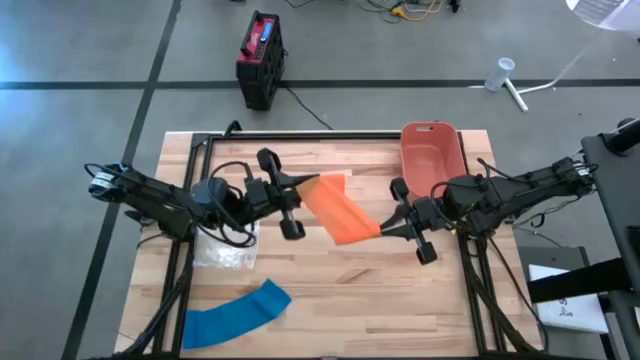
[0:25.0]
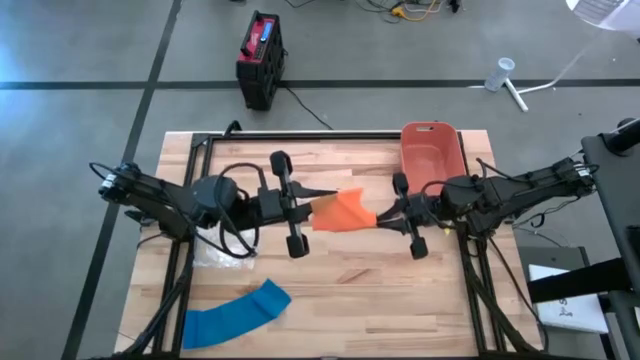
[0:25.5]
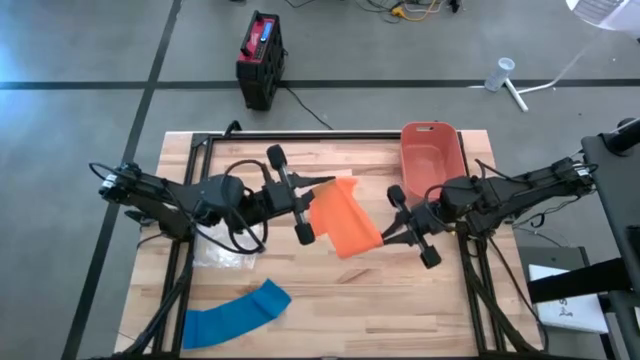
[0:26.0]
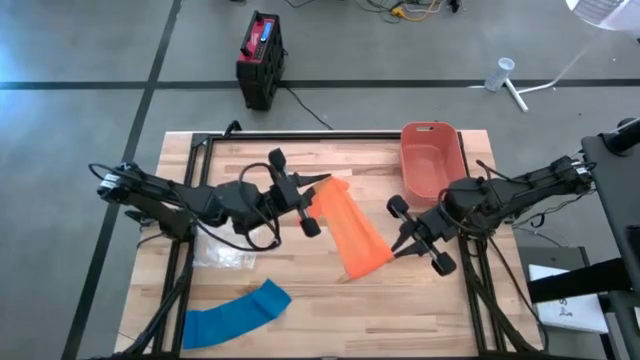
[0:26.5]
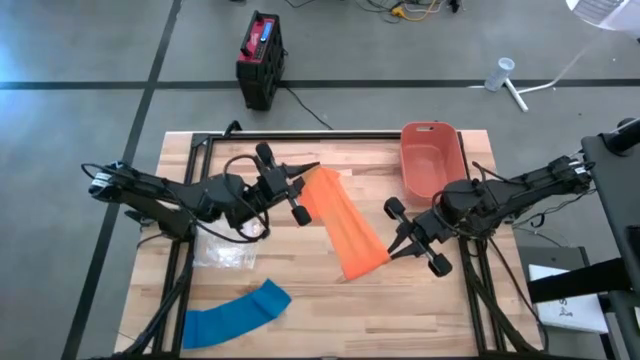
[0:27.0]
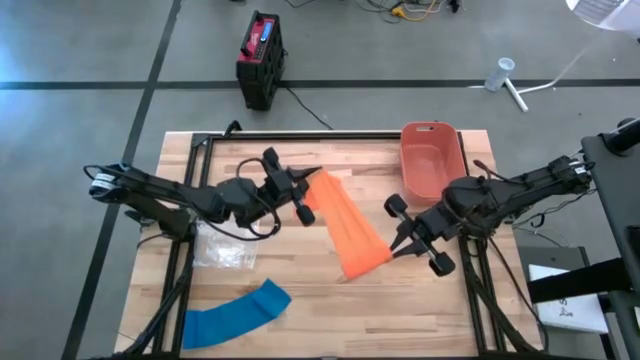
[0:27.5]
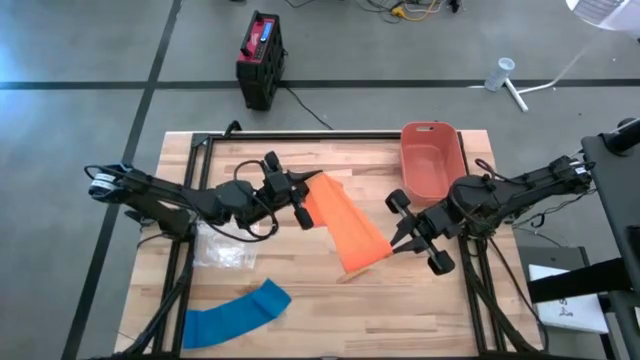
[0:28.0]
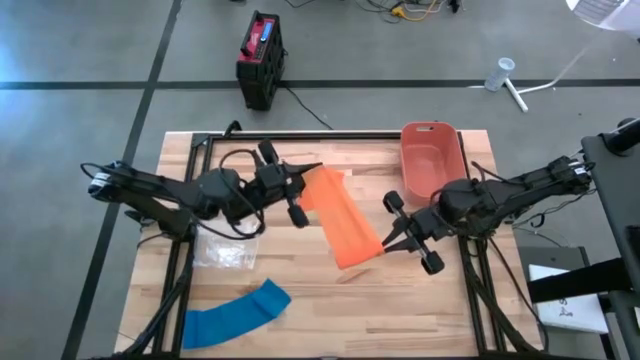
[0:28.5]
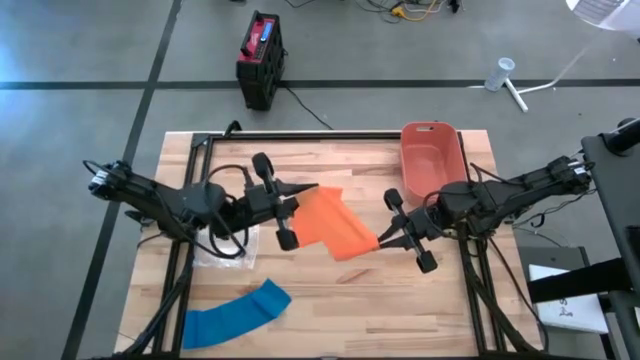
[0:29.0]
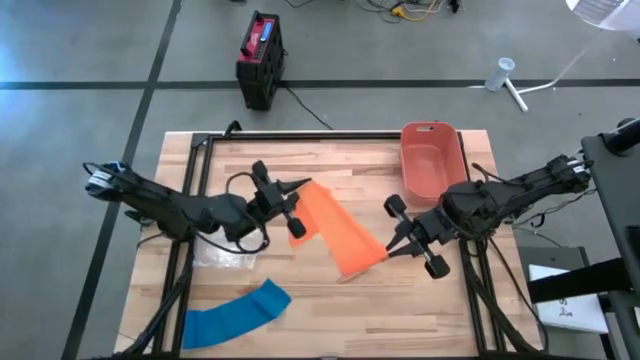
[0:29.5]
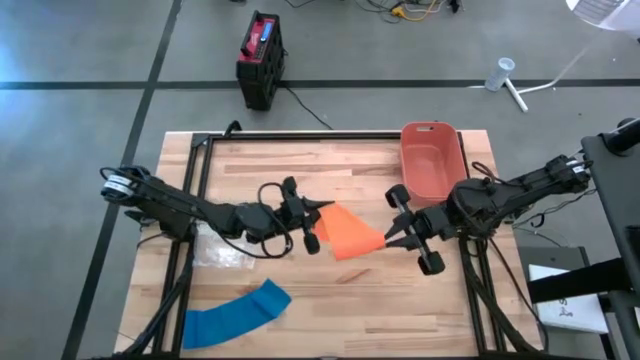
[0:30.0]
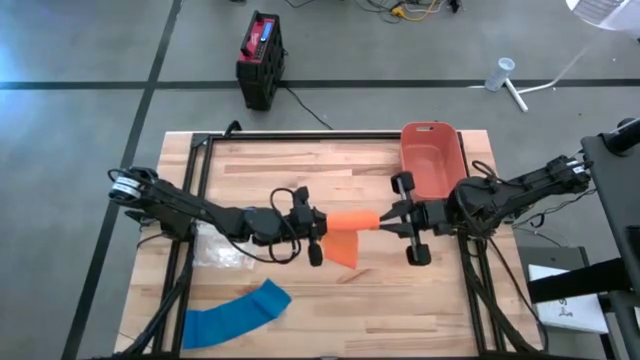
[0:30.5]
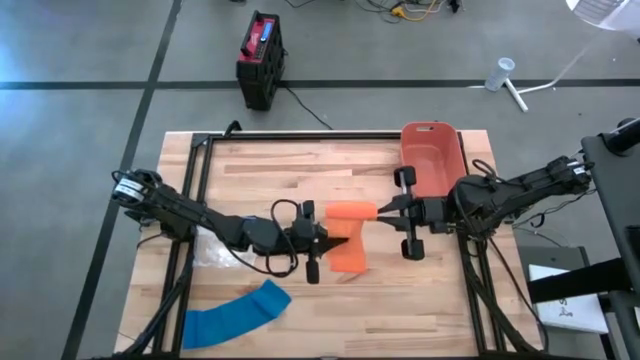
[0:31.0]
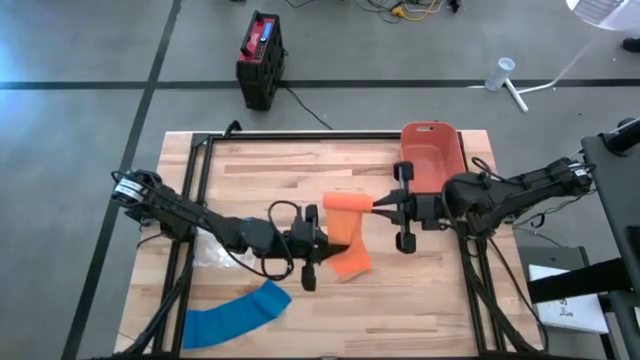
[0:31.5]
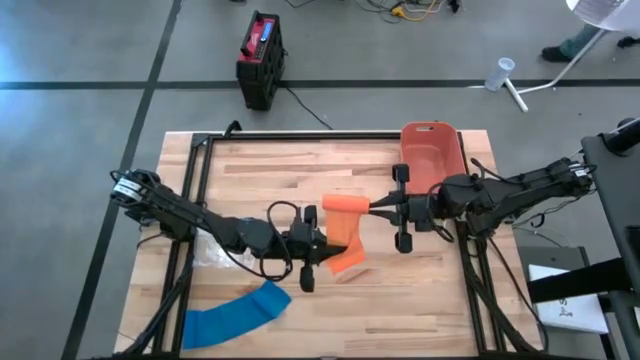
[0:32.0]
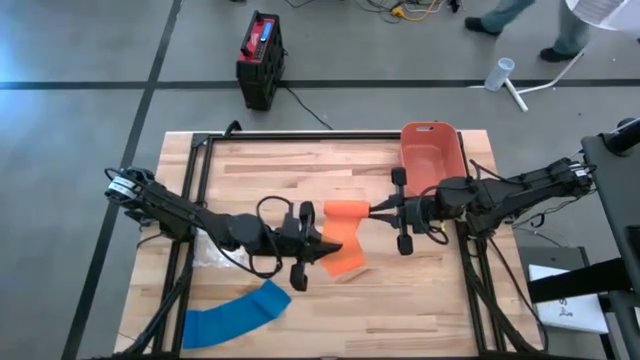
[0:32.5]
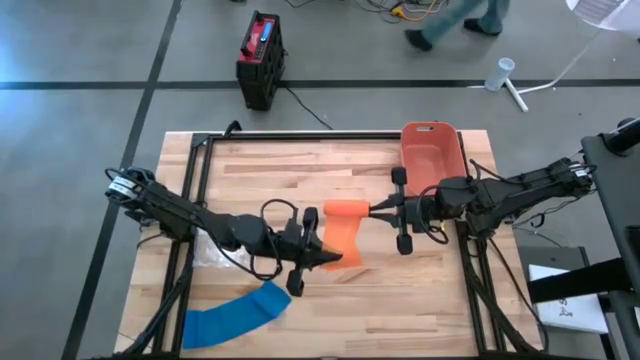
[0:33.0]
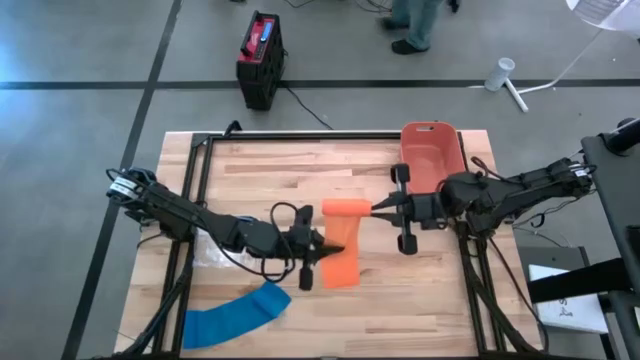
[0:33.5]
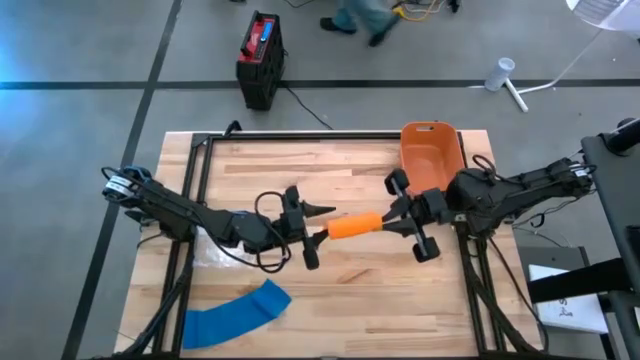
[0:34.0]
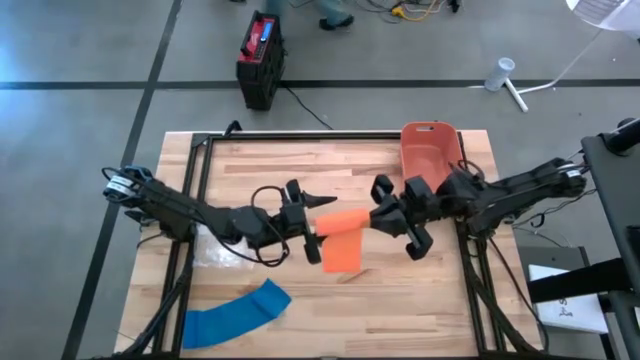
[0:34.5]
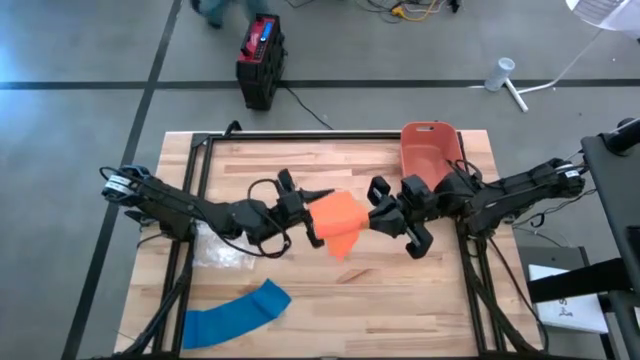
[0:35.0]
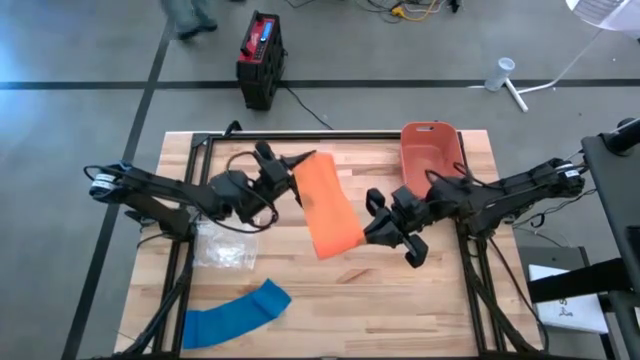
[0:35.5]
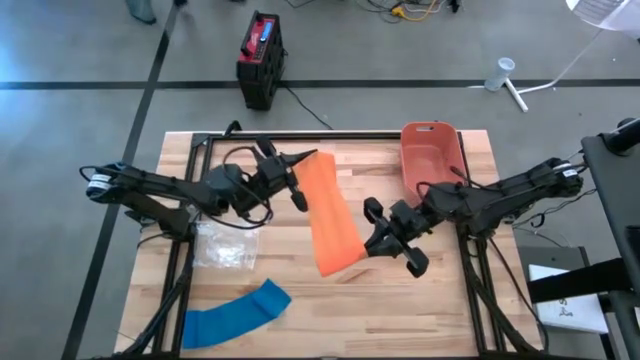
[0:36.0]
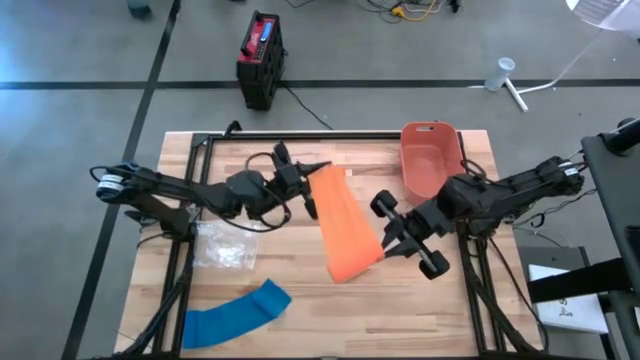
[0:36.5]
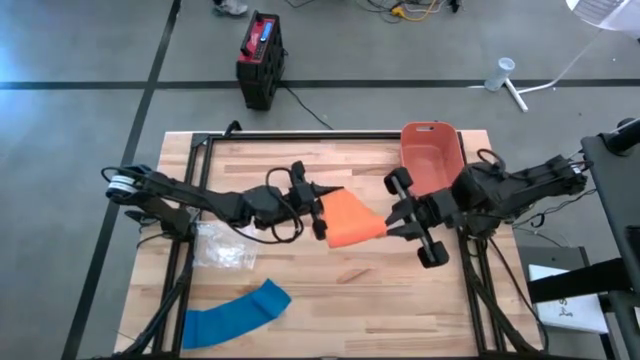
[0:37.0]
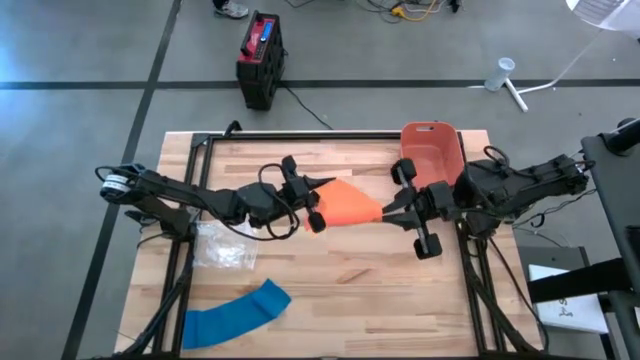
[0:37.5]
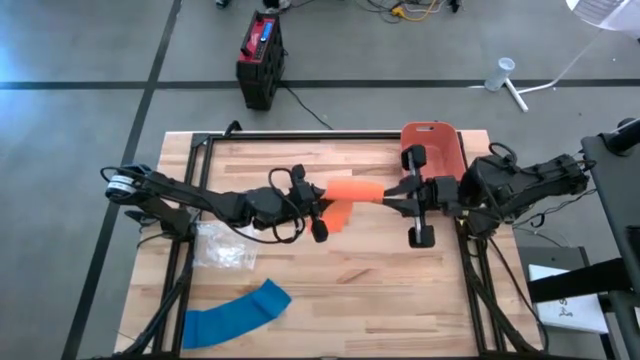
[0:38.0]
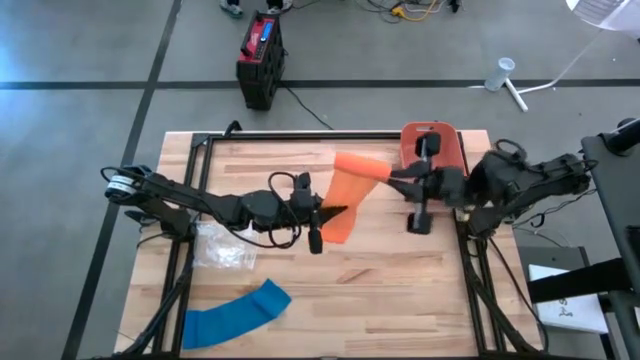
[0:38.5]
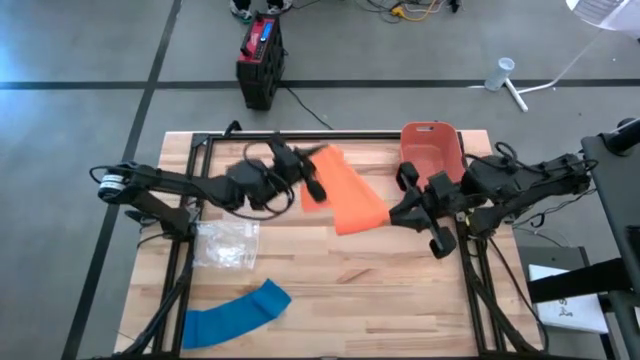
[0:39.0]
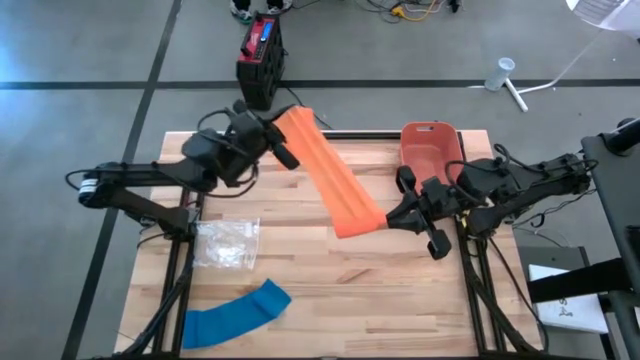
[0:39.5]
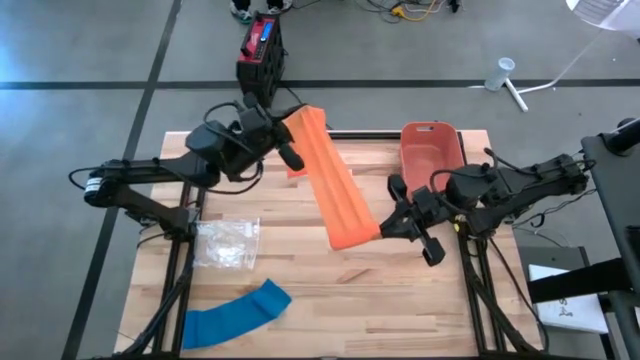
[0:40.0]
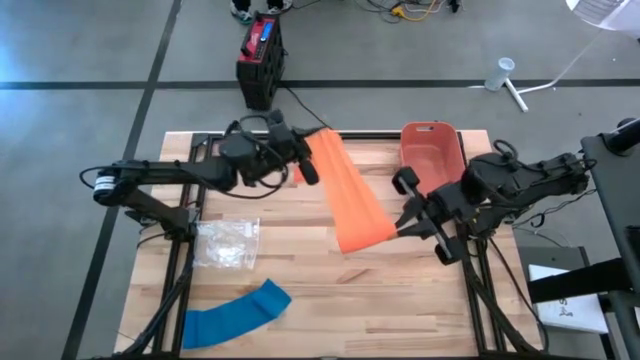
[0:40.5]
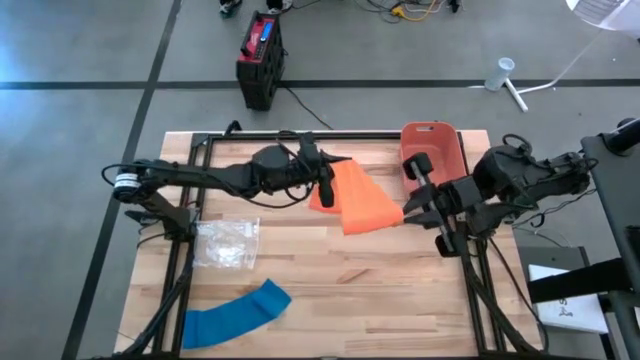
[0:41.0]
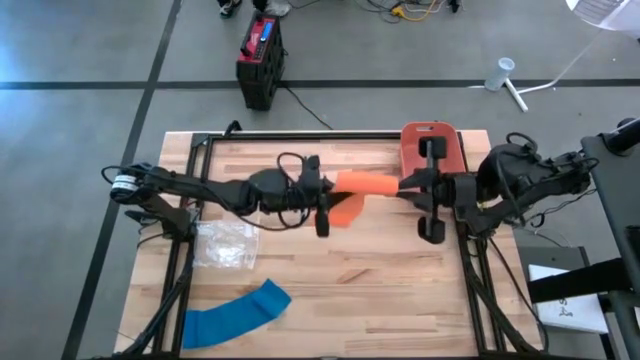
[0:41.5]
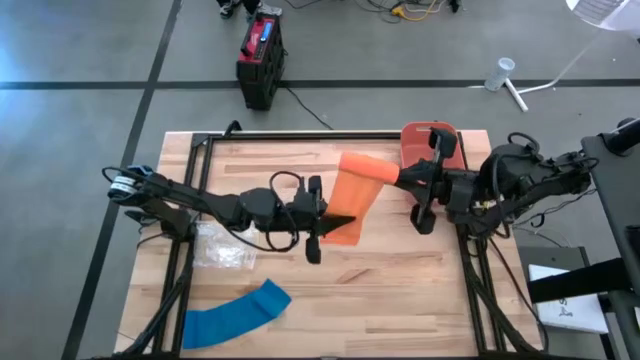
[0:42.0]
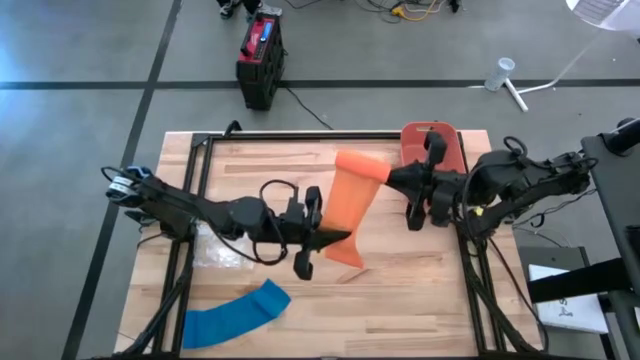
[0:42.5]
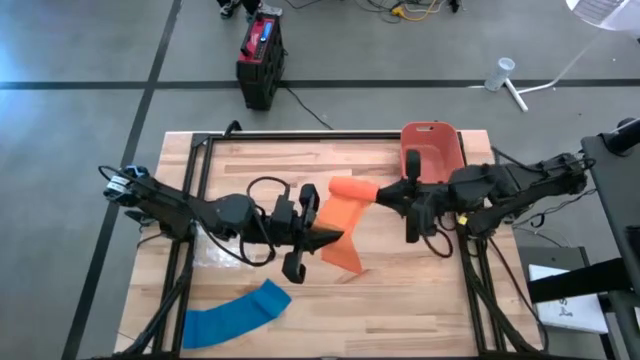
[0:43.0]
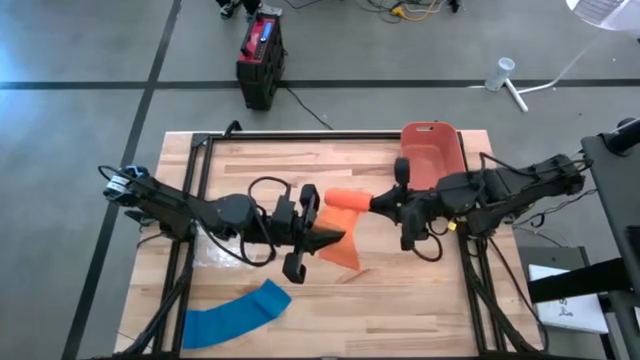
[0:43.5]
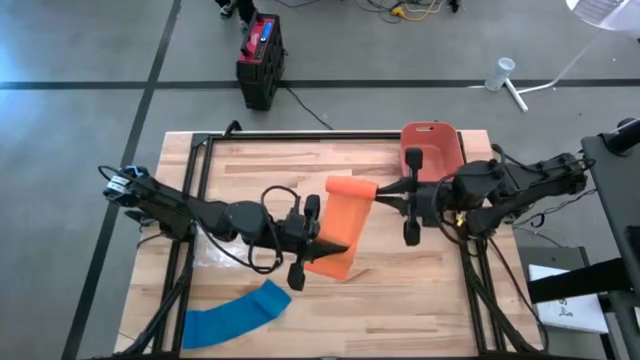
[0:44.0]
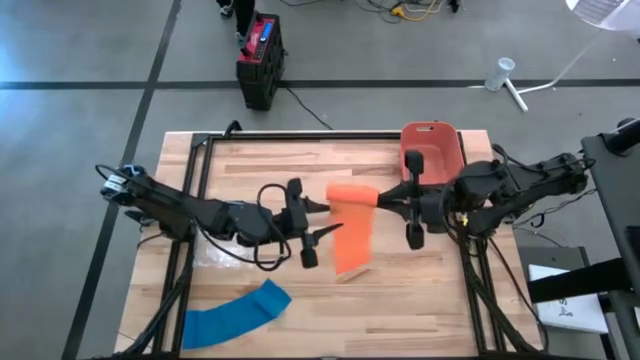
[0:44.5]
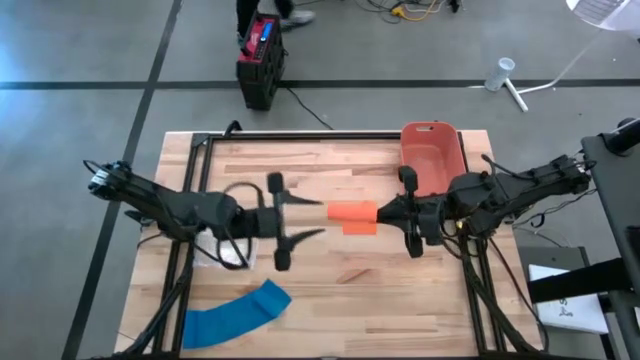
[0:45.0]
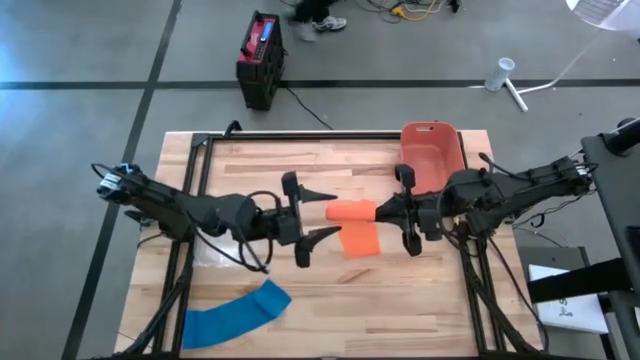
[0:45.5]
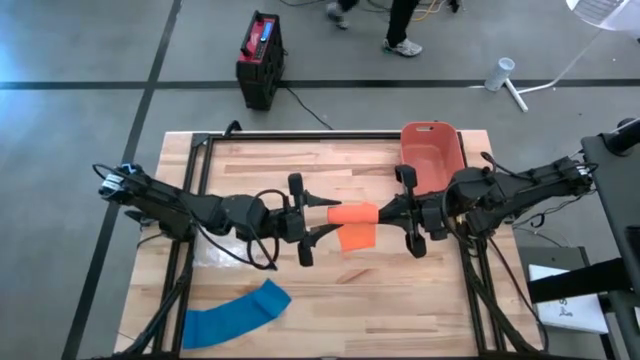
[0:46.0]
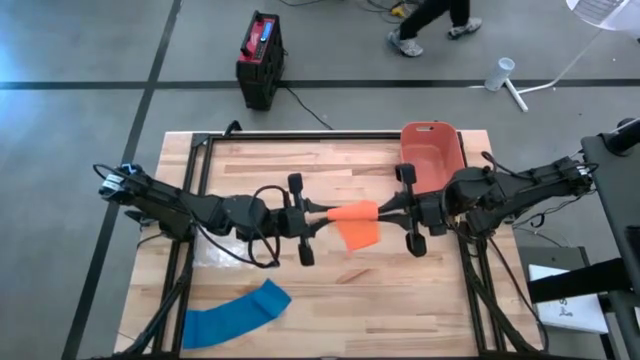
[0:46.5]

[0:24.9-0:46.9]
Task: Roll bandage
Roll the orange bandage

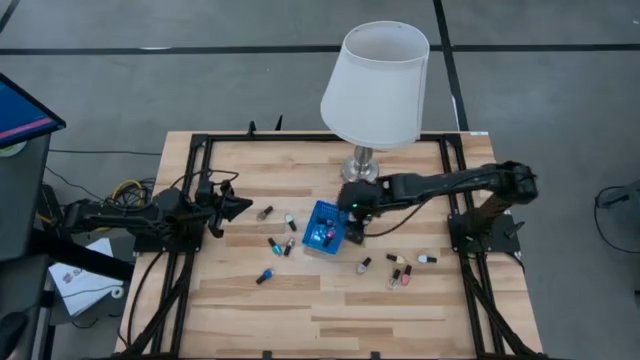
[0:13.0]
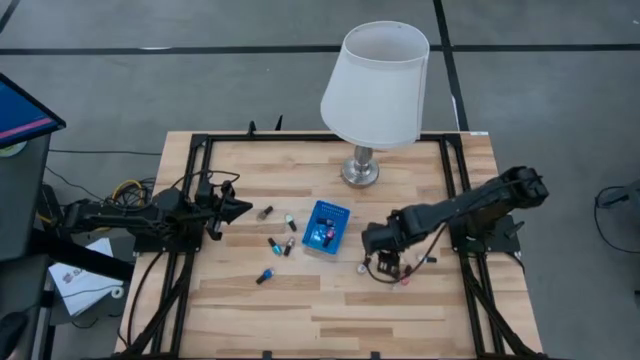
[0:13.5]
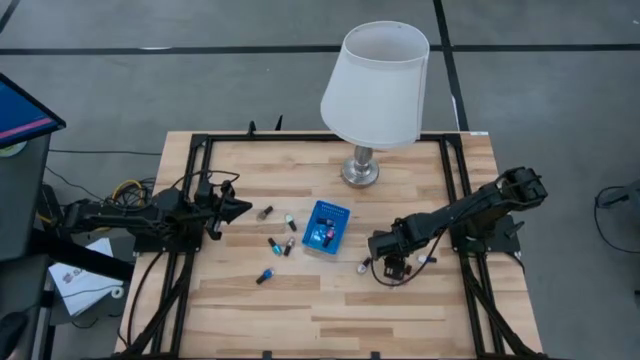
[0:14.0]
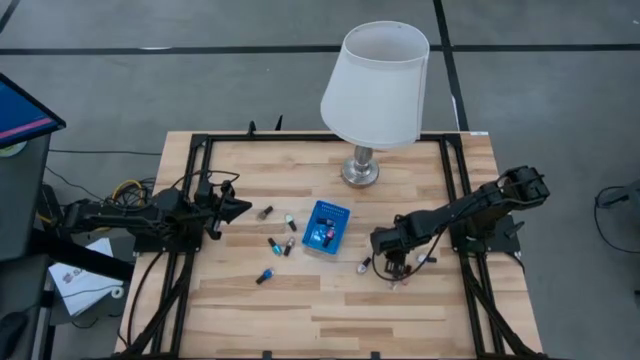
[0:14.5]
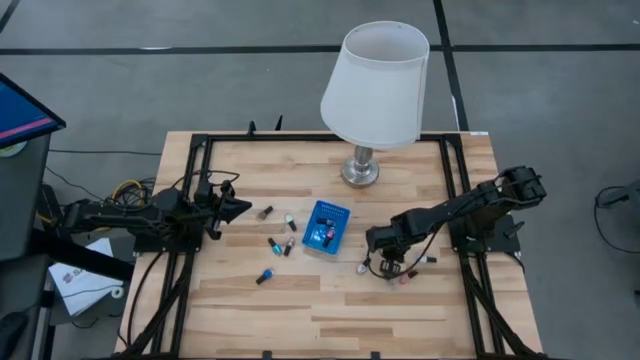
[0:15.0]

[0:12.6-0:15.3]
Task: Pick & Place Nail Polish
Put the yellow nail polish into the blue basket
